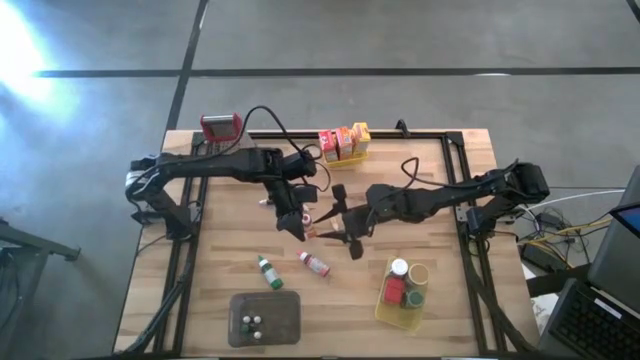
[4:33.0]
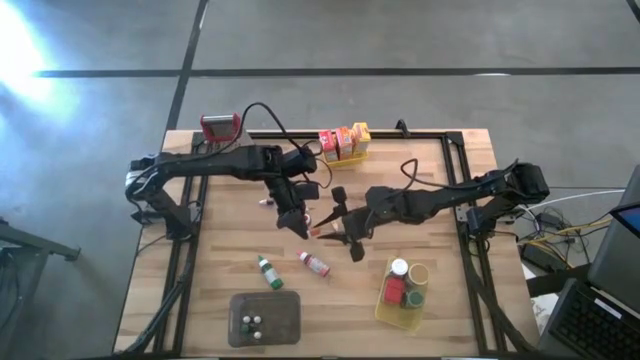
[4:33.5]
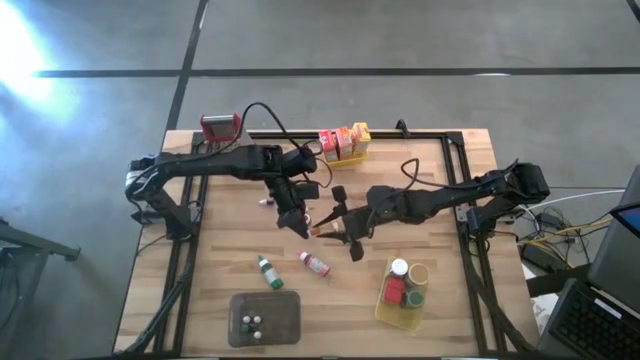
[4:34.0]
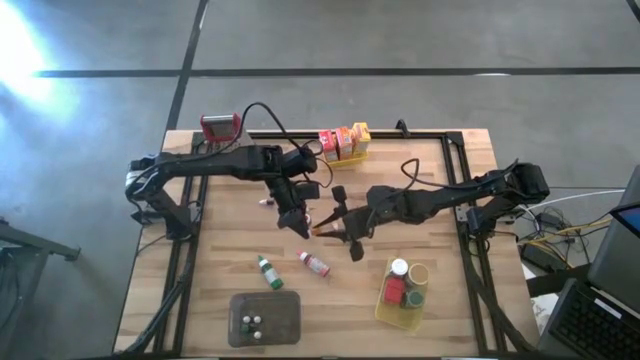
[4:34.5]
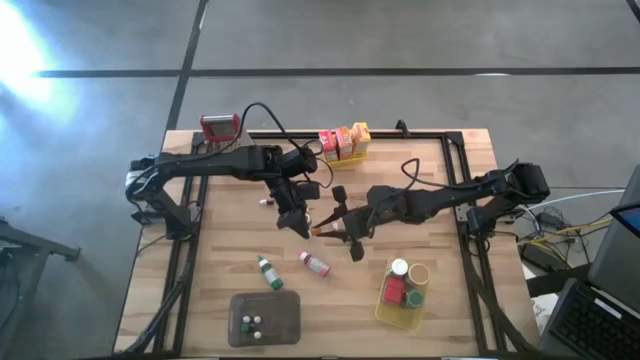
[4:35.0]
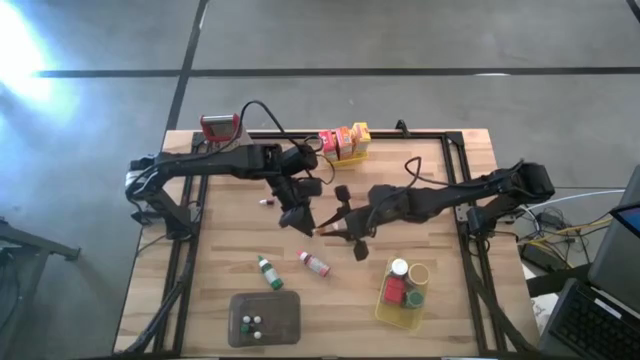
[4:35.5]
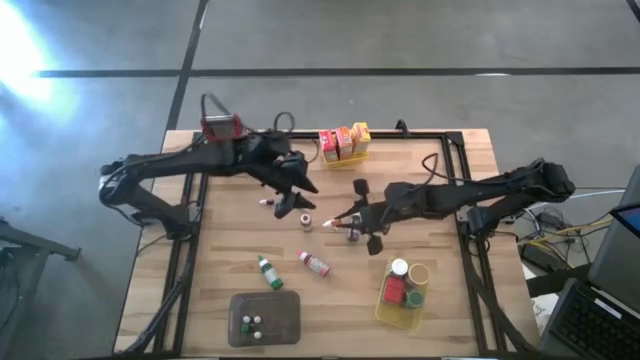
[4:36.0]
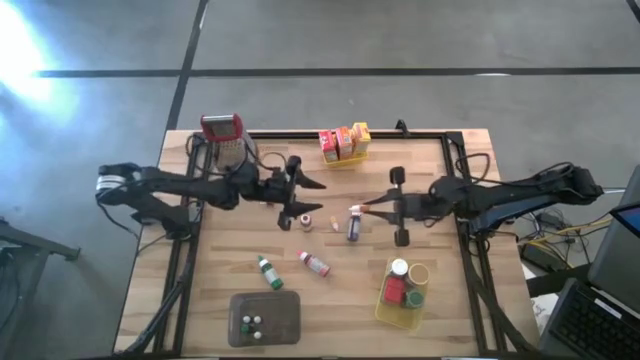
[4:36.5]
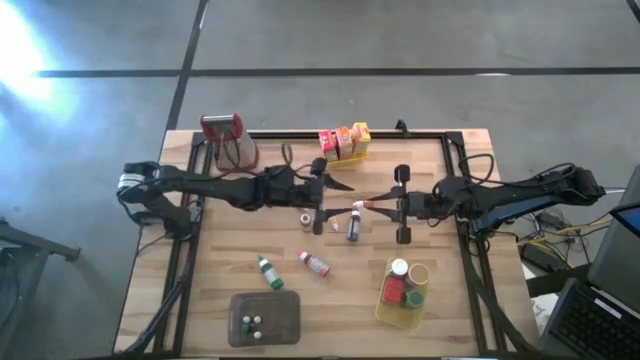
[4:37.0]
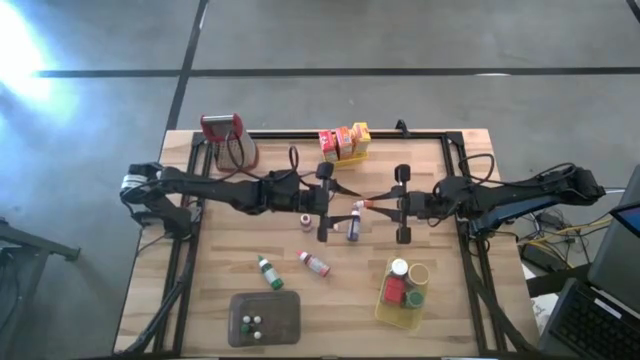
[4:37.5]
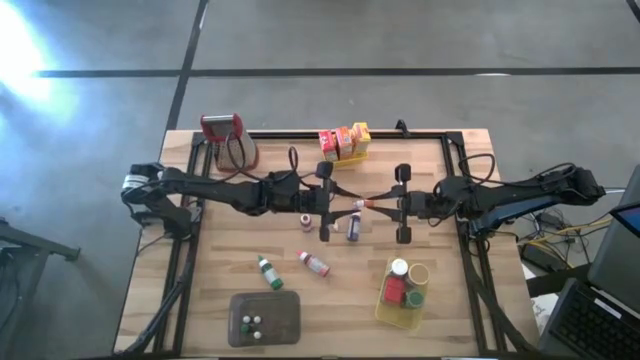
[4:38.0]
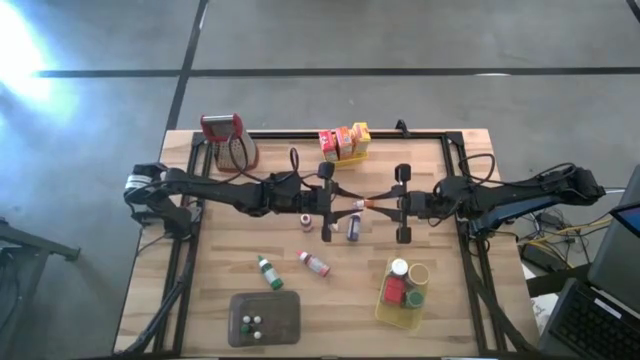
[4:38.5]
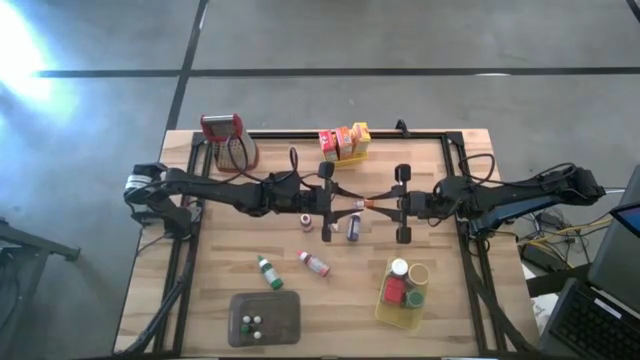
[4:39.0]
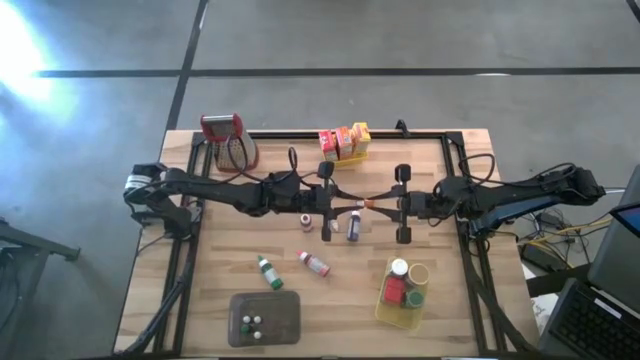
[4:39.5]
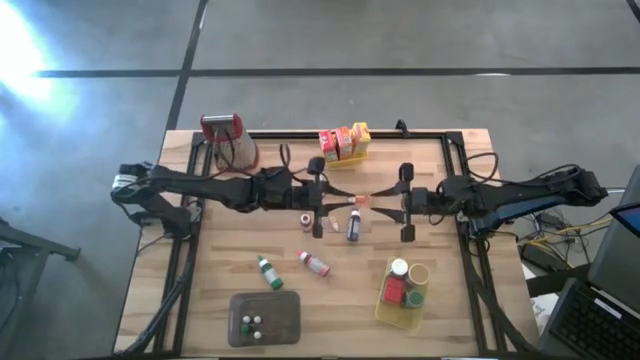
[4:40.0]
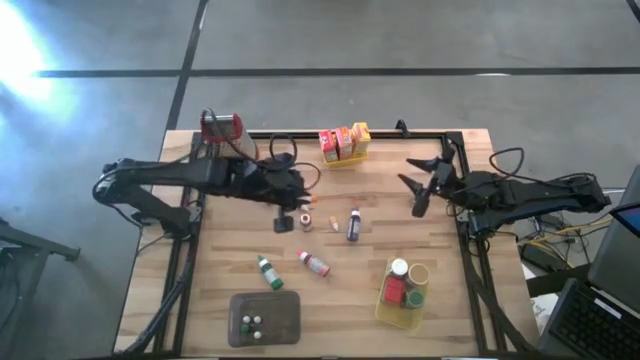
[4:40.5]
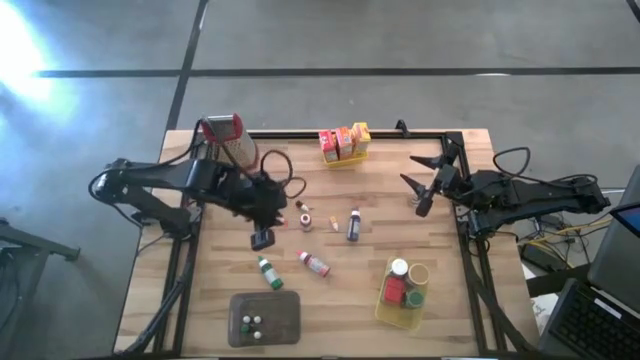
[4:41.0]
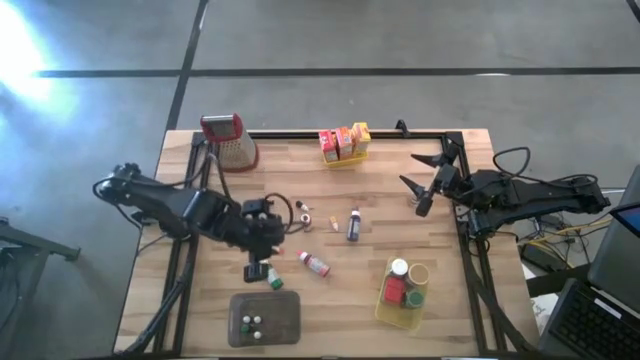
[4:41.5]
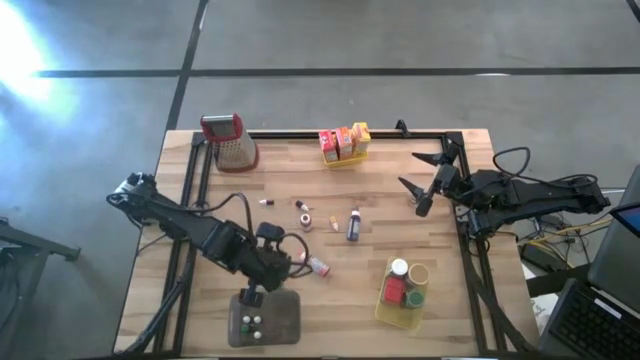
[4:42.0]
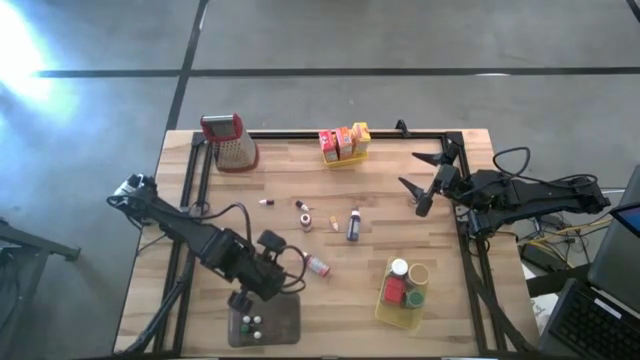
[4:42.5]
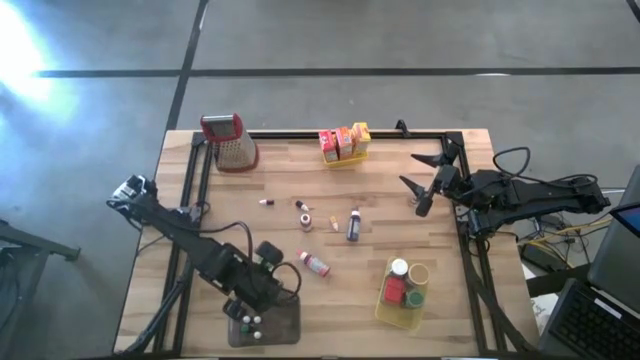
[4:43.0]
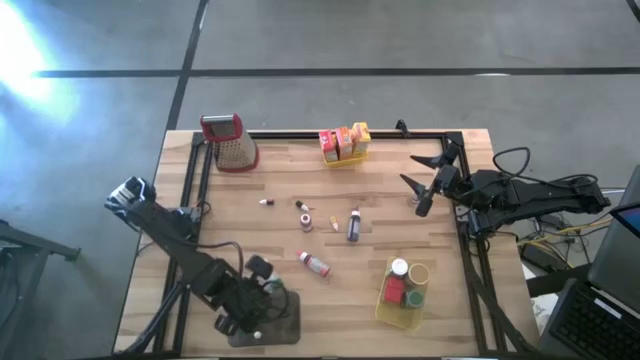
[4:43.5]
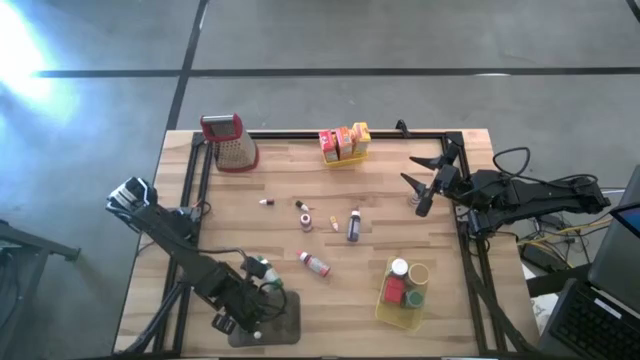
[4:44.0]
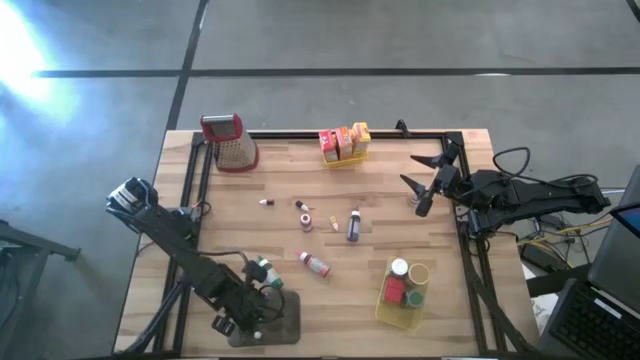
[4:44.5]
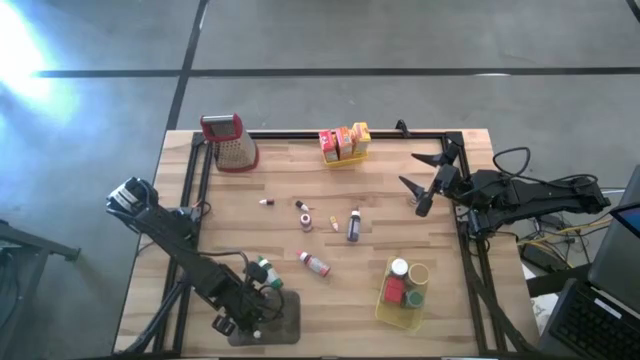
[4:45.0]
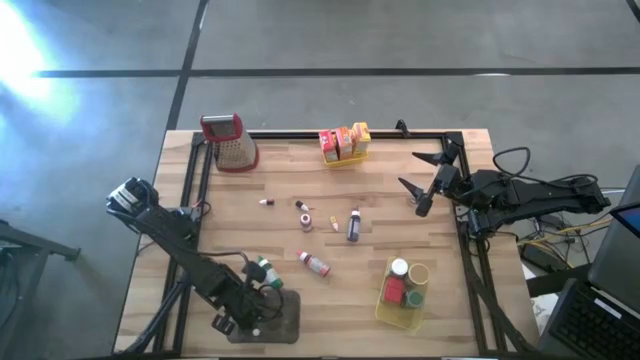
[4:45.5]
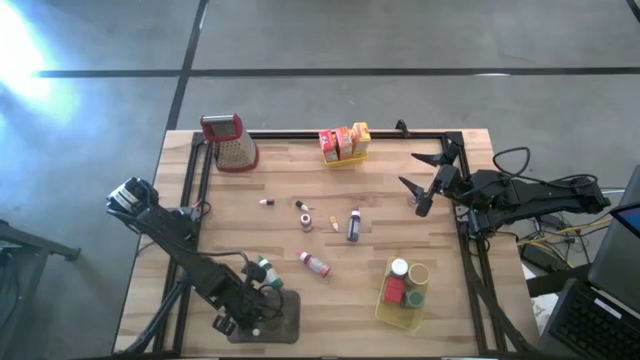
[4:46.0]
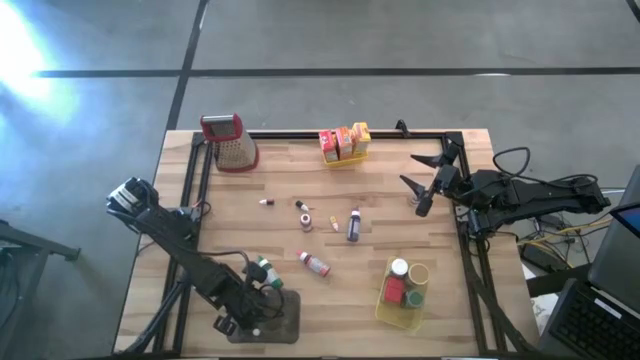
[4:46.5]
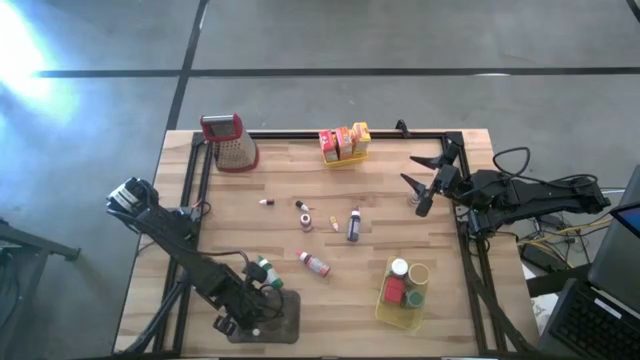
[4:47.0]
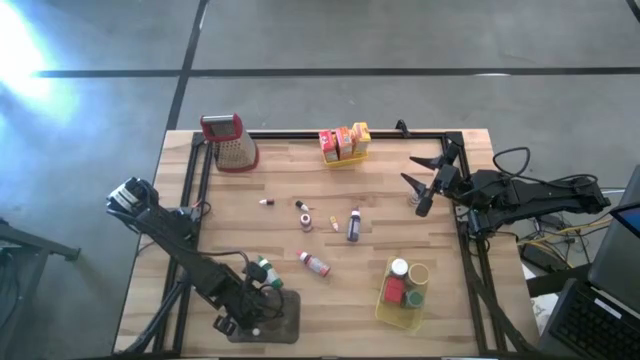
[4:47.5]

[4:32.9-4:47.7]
Task: Pick & Place Kitchen Items
Put the top orange food coloring bottle into the black bin

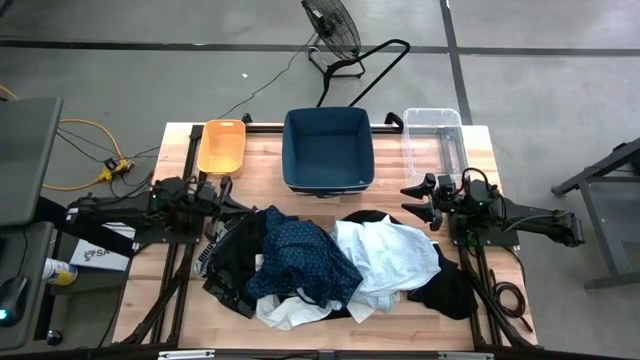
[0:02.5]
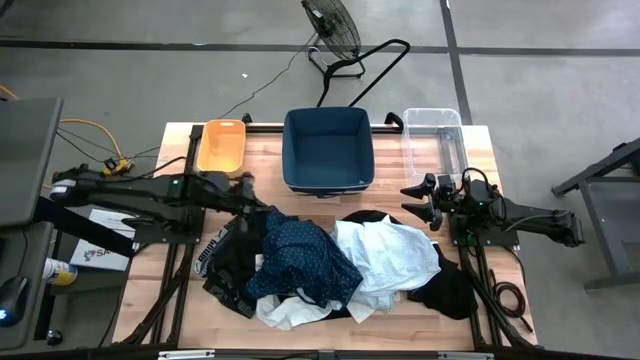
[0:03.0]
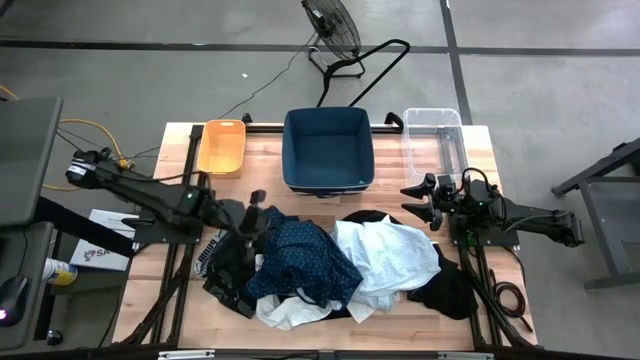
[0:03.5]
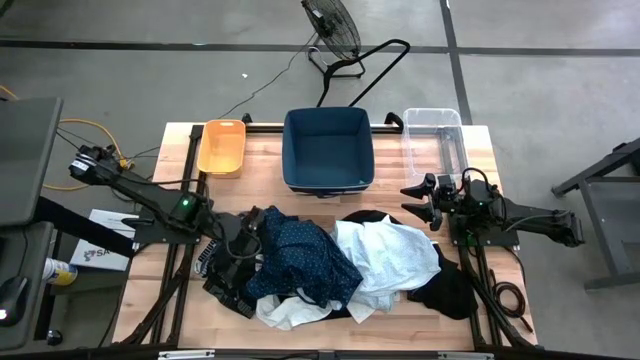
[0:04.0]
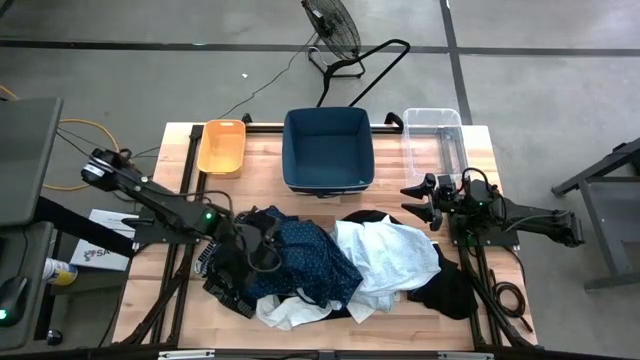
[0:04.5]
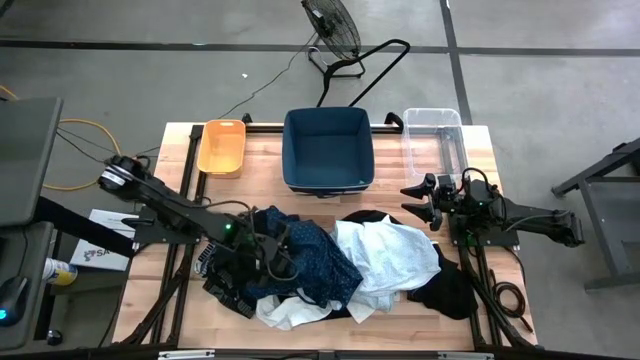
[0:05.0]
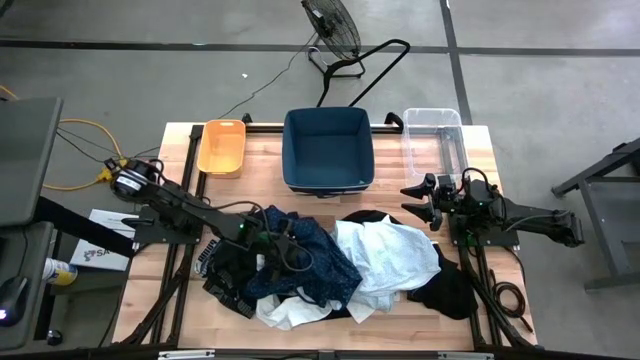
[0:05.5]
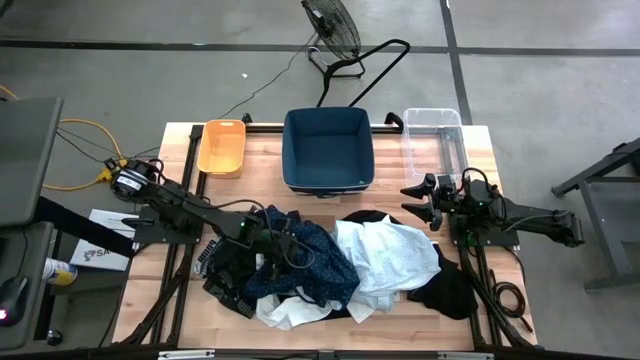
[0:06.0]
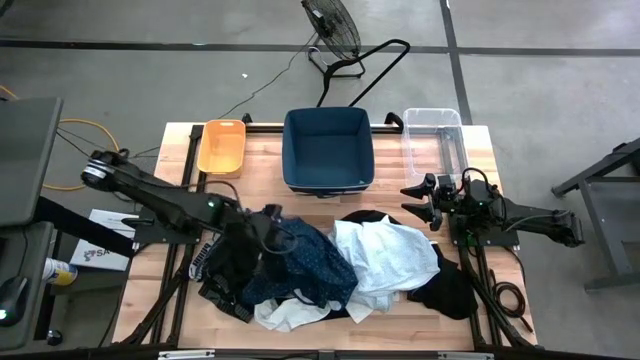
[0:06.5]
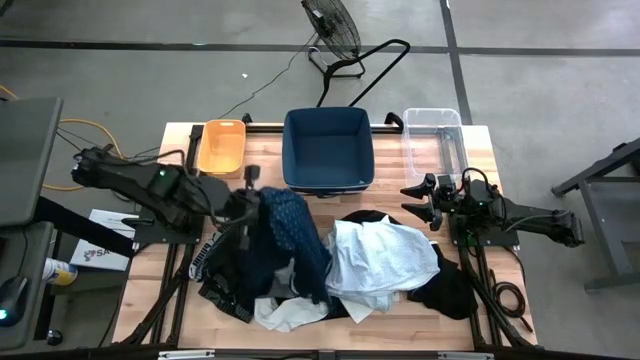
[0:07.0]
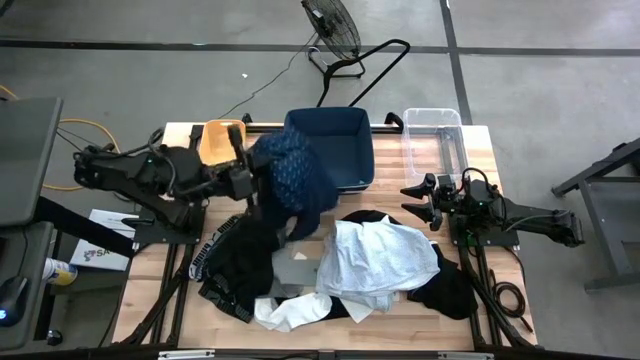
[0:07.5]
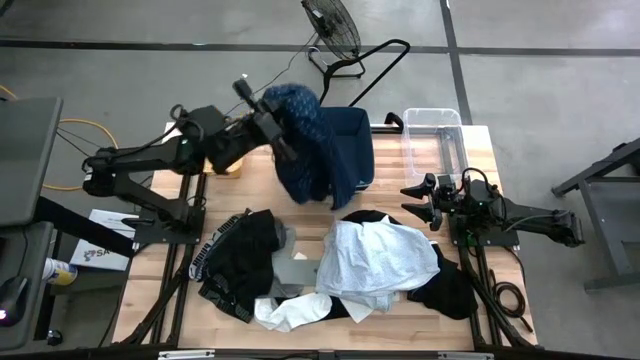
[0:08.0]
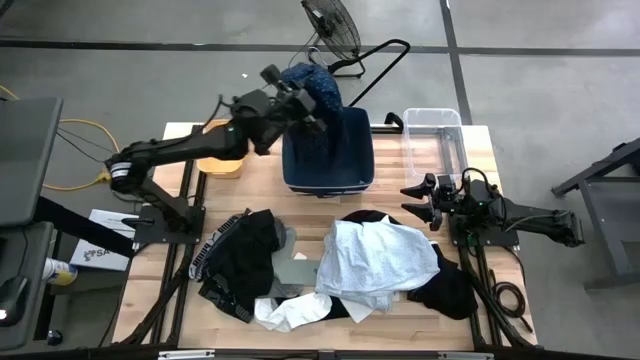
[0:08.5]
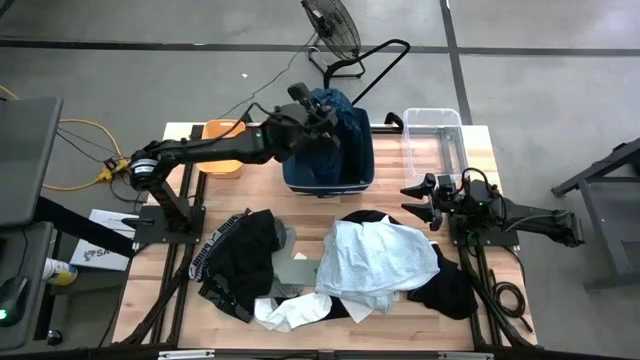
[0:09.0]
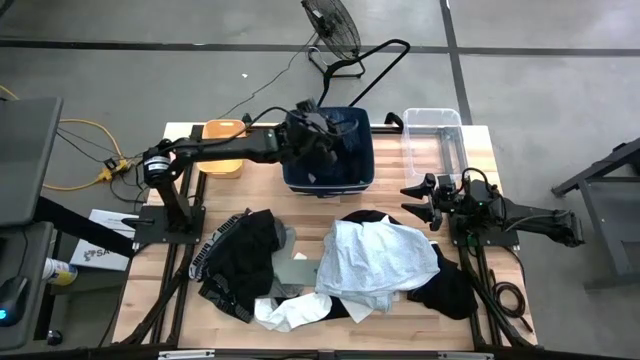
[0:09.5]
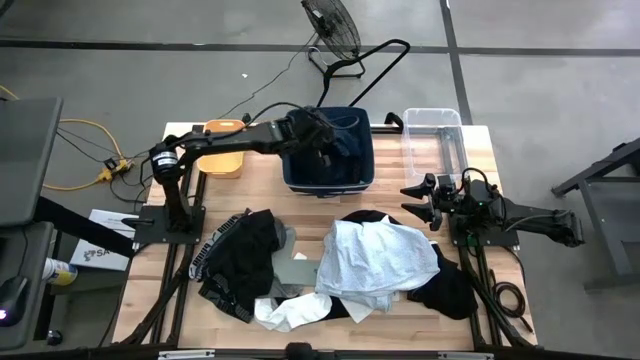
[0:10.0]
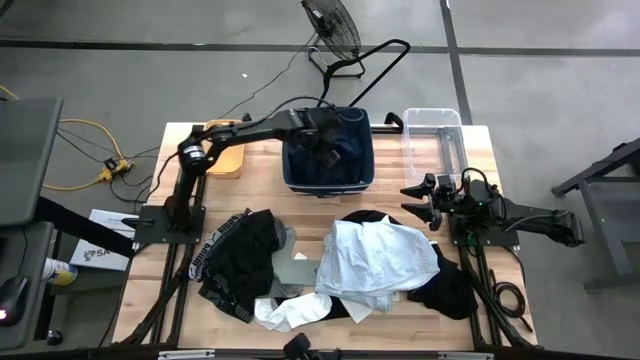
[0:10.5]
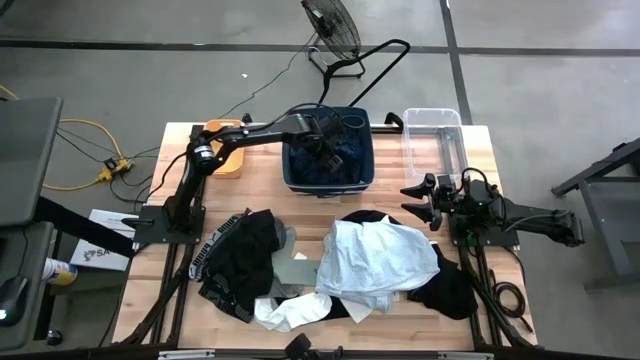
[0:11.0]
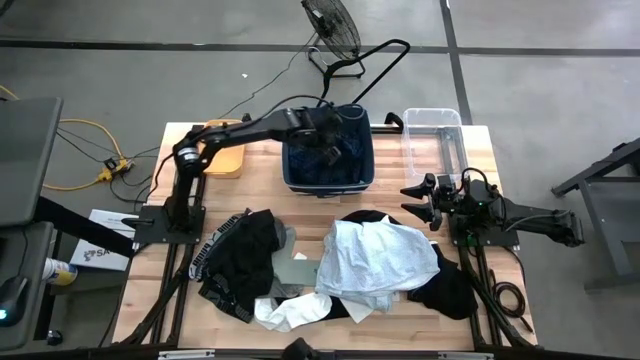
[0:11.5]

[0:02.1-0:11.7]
Task: Pick & Place Cloths
Put the blue t-shirt into the blue bin
